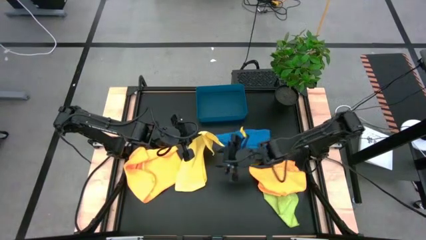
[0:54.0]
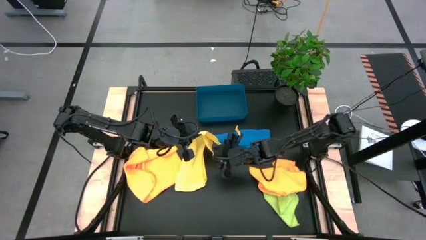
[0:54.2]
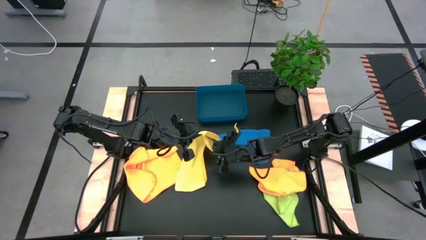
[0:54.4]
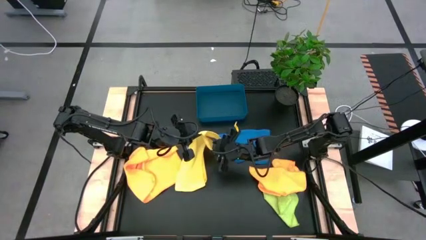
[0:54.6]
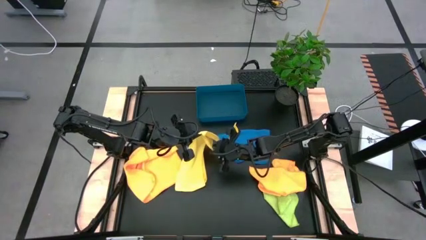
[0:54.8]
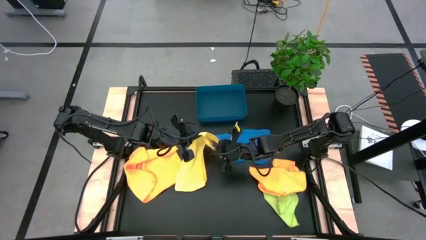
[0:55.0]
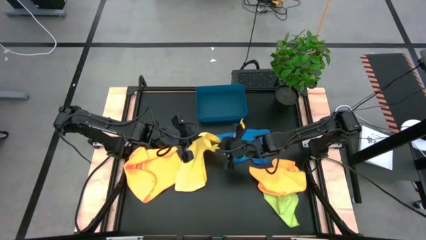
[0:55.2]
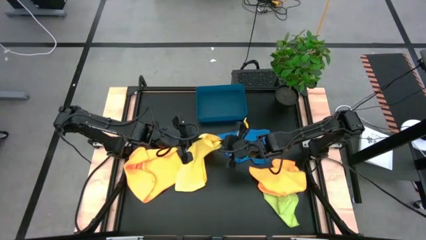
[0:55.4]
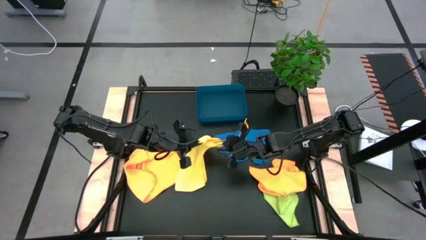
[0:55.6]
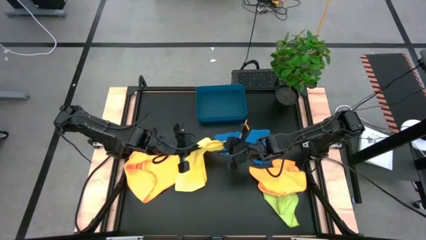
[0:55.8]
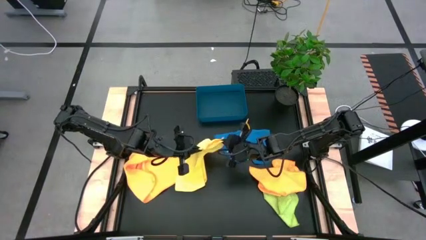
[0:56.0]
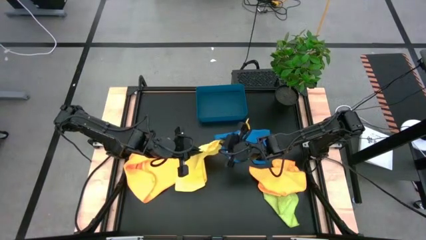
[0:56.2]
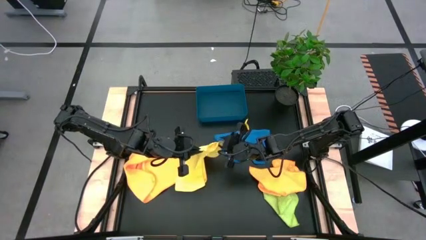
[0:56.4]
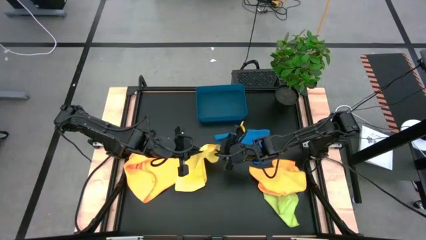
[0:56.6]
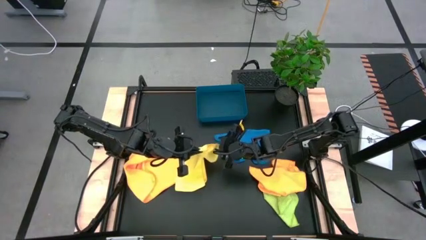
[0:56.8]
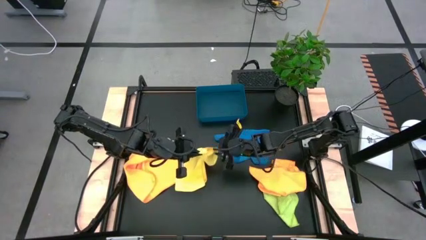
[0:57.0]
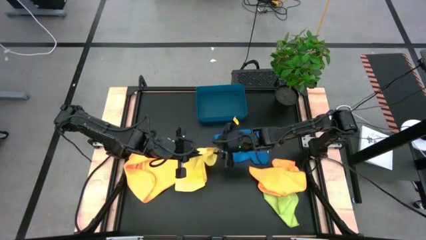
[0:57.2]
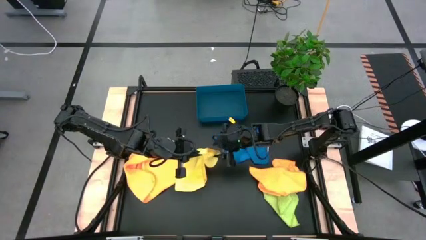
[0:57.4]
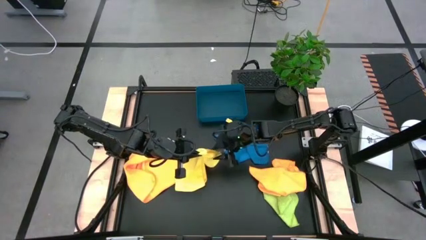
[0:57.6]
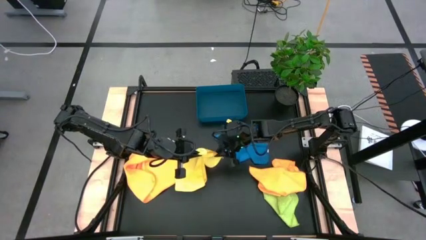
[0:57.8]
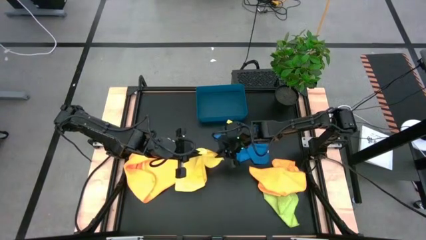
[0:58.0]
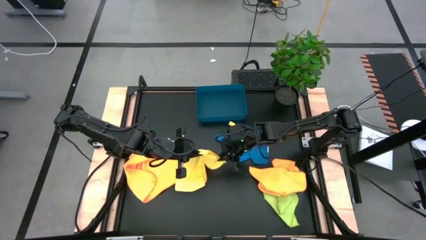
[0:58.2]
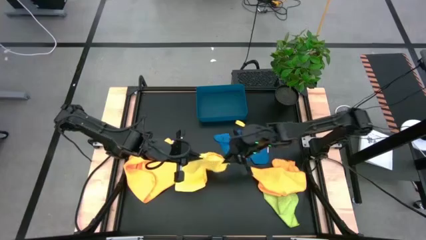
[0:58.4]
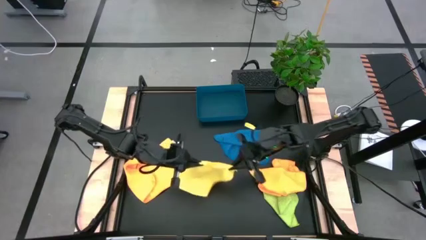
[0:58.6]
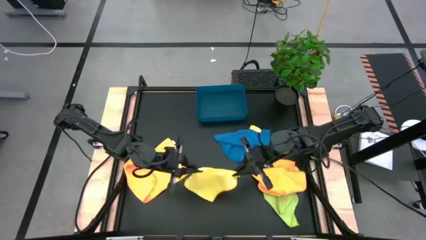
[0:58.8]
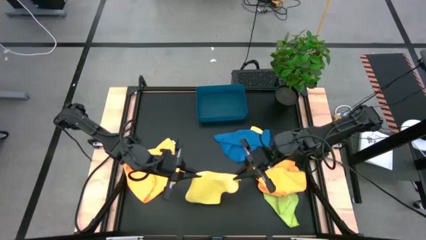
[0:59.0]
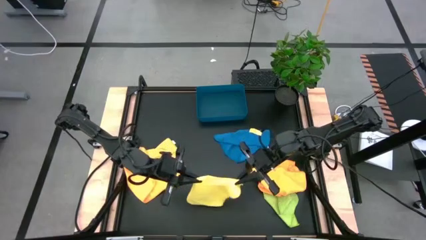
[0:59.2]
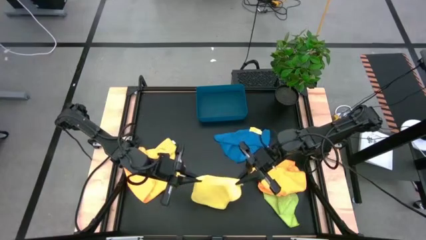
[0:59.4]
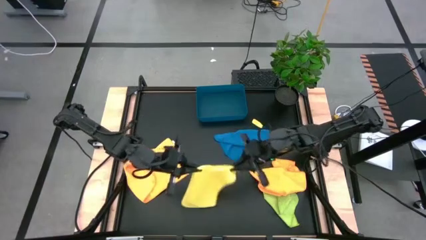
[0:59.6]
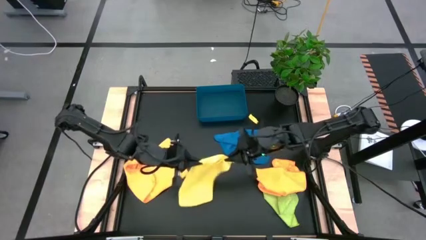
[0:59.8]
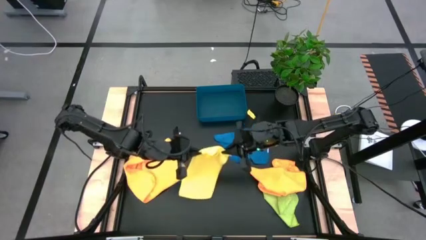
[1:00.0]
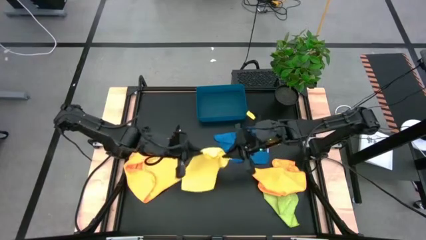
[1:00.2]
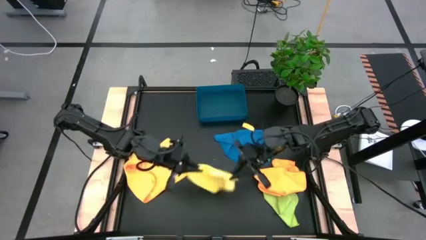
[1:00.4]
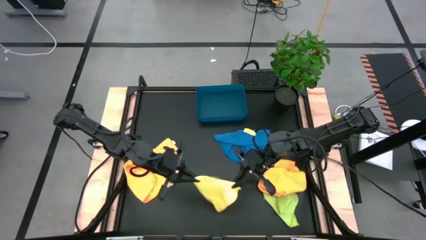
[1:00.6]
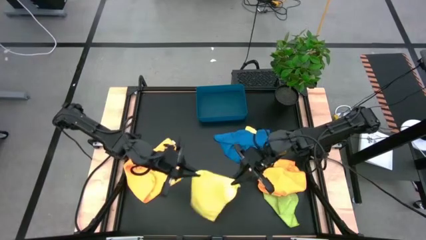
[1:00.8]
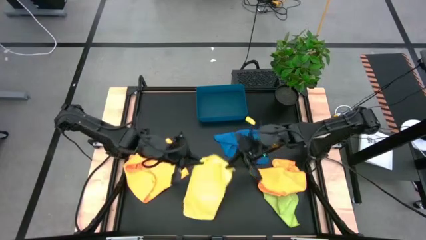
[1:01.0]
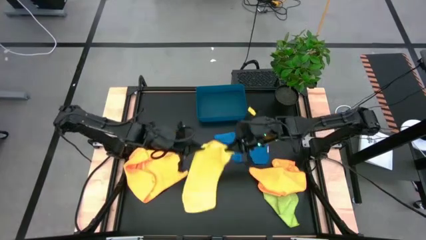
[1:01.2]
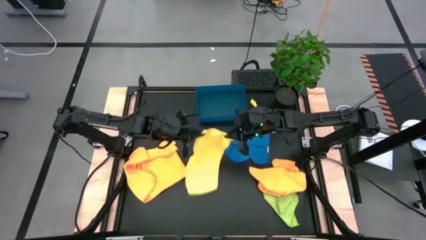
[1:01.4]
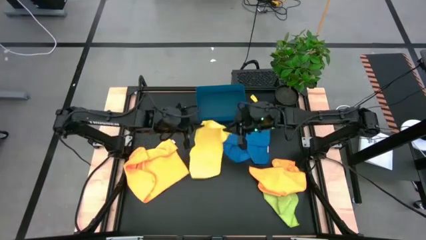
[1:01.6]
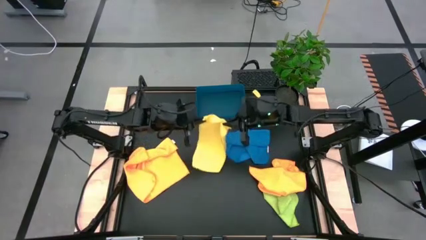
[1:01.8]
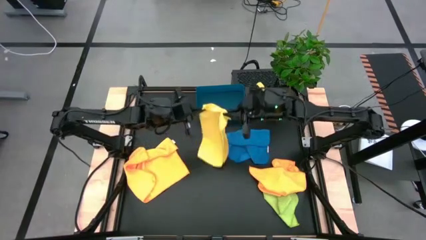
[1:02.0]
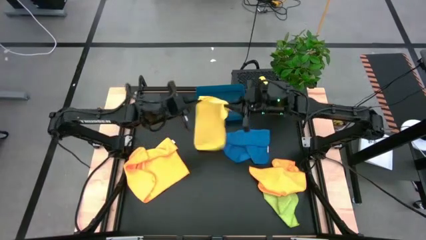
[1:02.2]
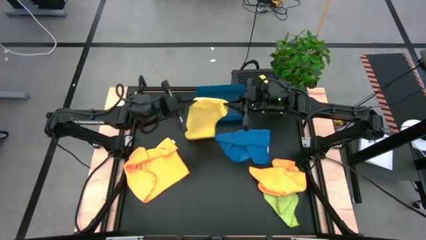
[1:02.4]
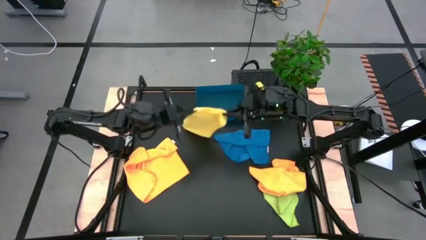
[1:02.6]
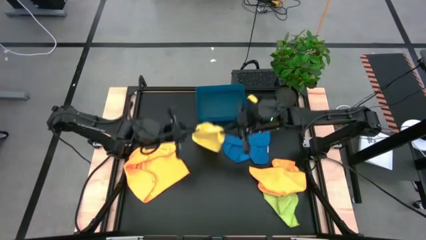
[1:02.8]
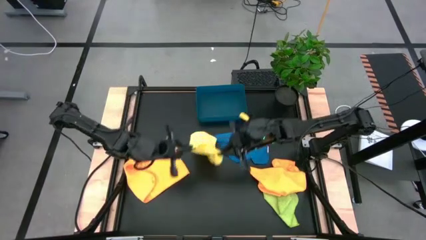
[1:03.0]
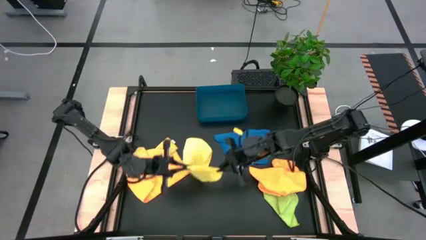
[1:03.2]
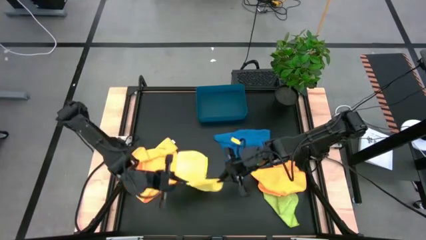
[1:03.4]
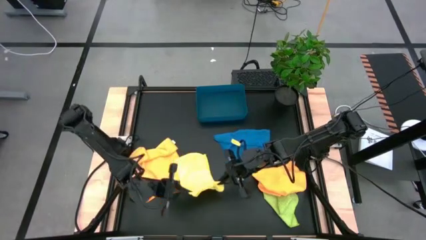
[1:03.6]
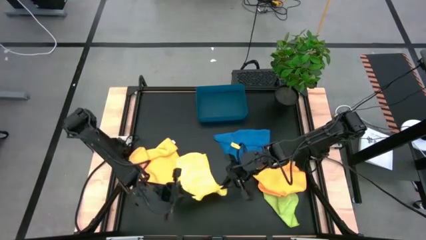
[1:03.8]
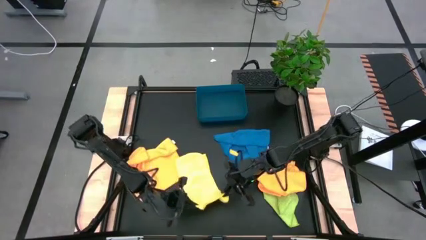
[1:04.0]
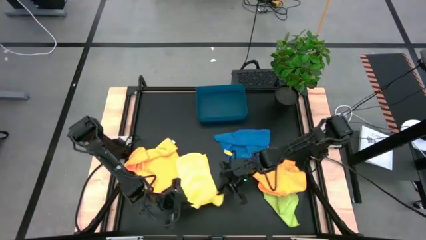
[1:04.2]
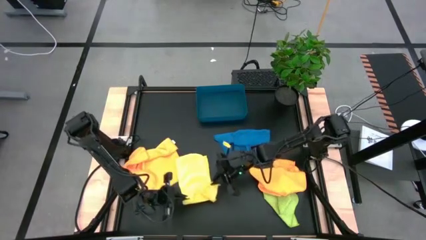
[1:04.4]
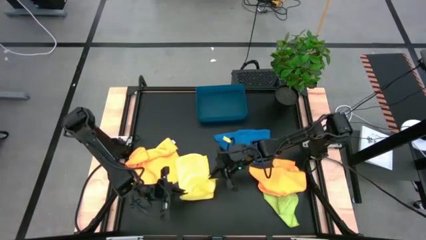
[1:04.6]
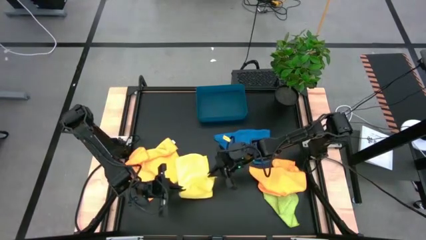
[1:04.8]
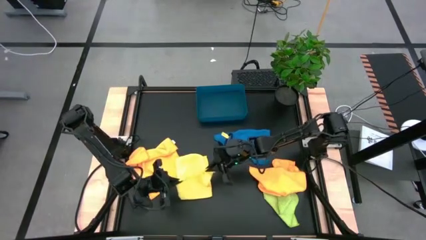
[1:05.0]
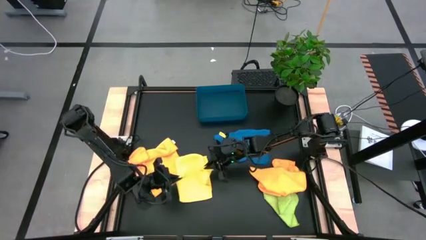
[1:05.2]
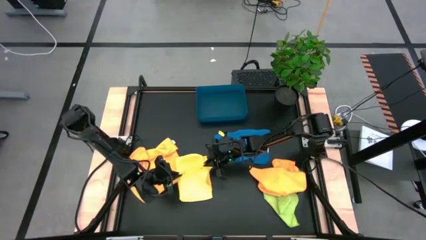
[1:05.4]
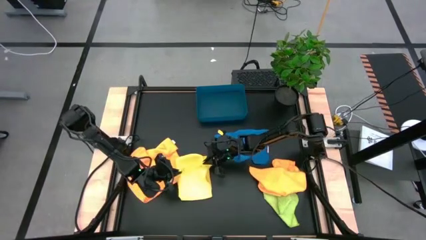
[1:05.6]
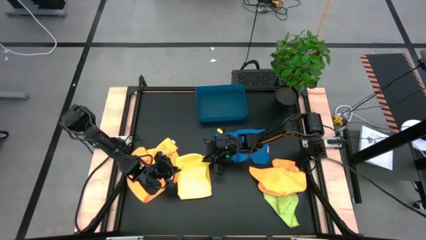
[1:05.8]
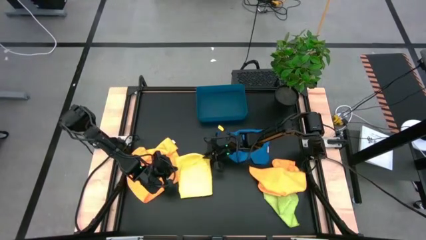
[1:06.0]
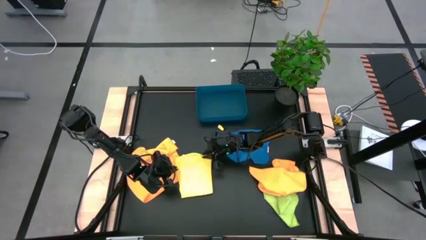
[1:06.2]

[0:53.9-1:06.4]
Task: Fold microfiber towels
Fold the yellow microfiber towel

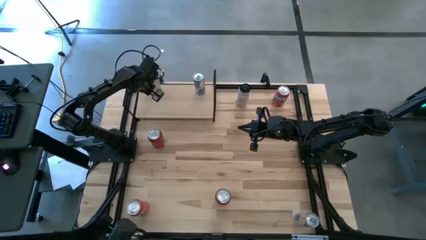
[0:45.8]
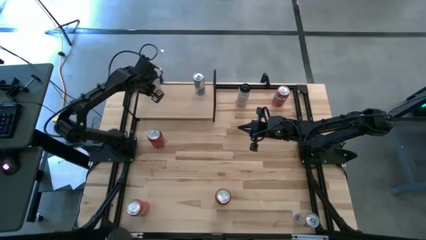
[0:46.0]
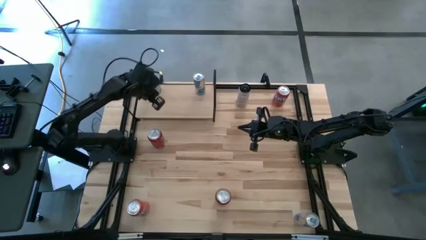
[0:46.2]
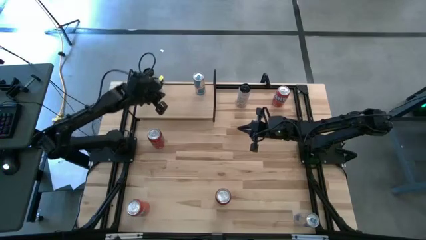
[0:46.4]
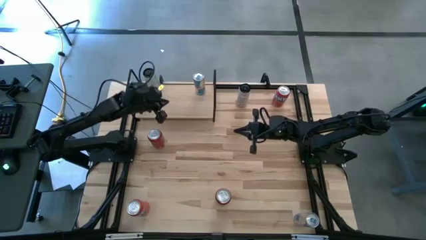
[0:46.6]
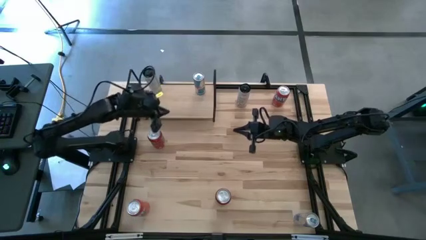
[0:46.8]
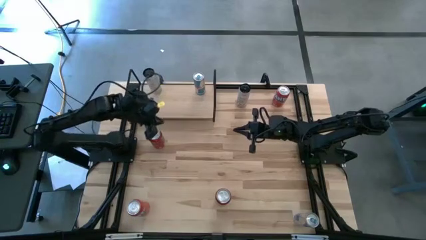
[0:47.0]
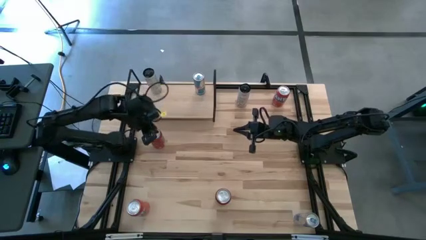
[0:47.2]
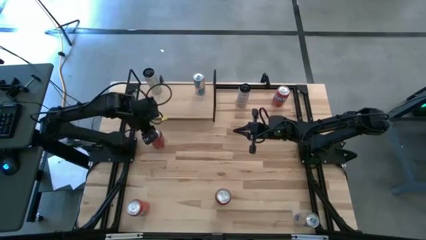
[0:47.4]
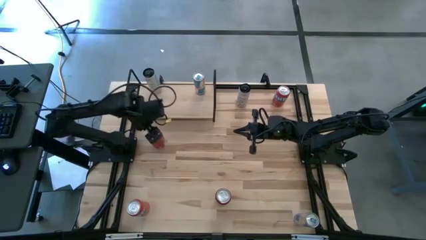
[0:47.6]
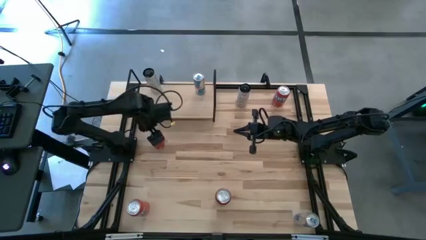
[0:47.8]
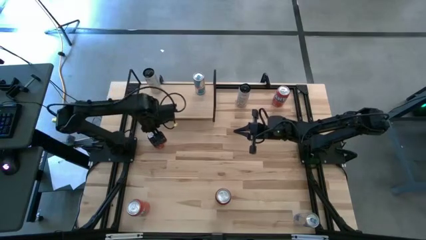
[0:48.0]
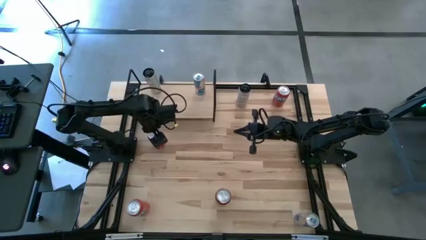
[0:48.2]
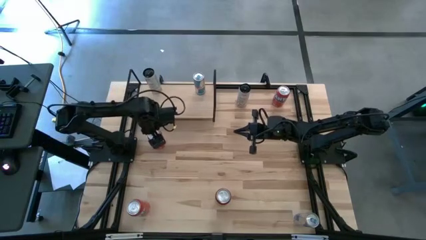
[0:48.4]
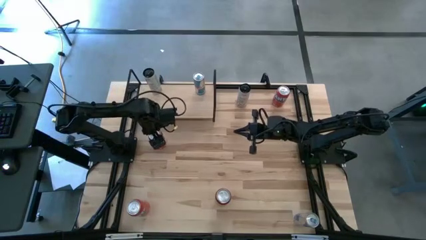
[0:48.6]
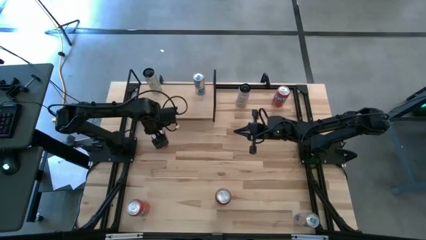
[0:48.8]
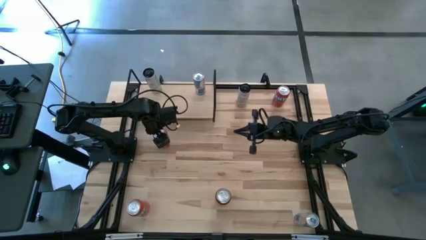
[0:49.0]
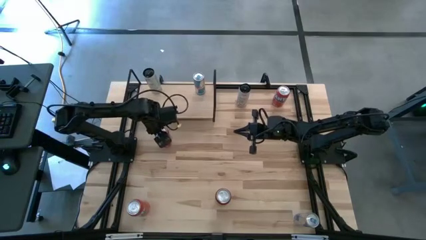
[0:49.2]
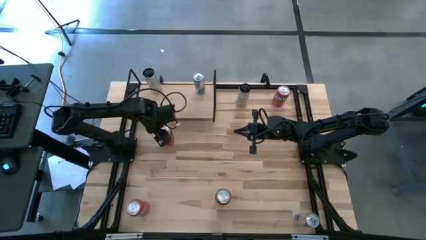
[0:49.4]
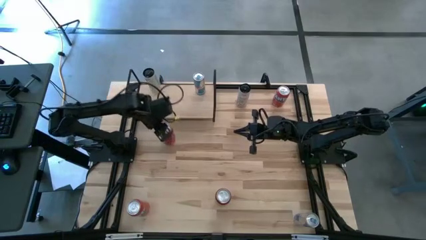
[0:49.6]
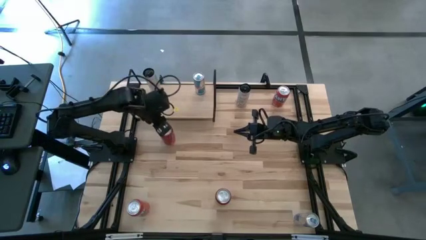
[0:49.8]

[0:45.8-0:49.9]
Task: Place canned beverage on shelf
Put the top red soda can on the shelf
